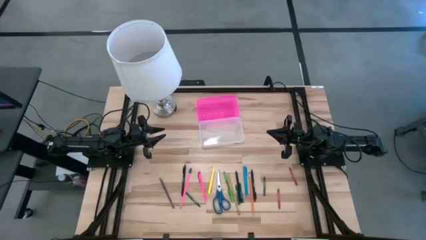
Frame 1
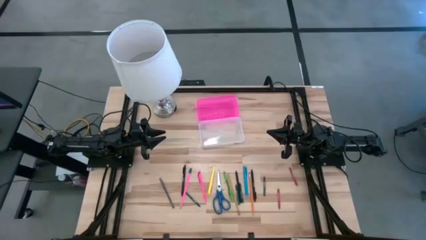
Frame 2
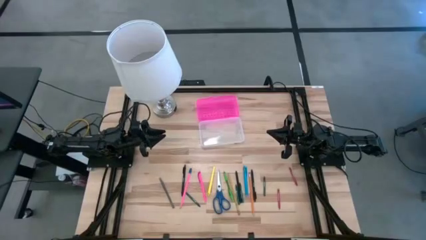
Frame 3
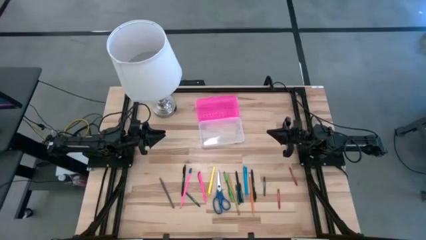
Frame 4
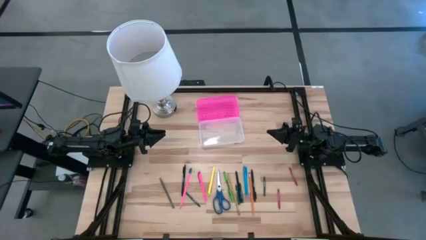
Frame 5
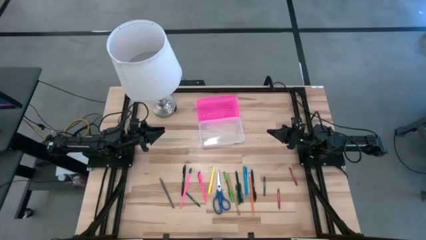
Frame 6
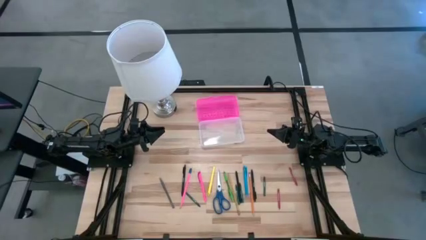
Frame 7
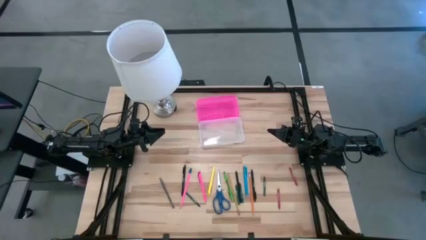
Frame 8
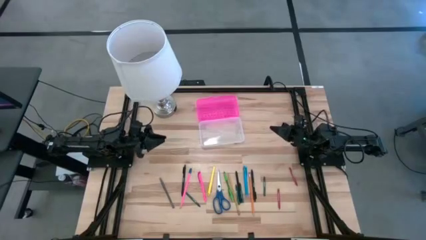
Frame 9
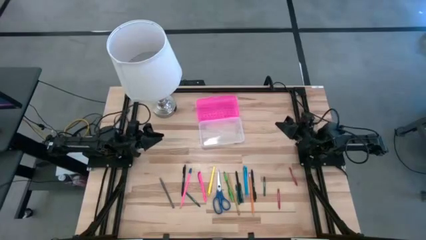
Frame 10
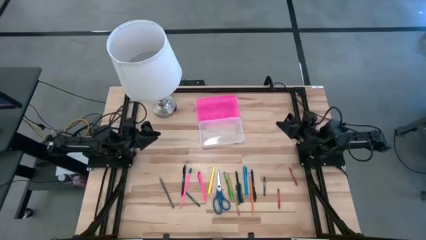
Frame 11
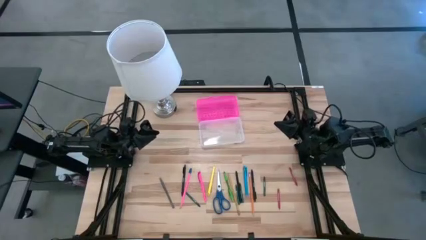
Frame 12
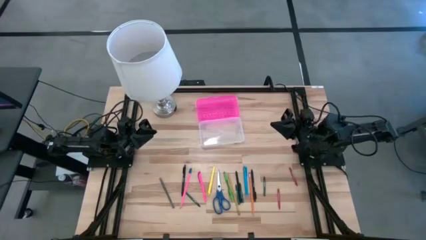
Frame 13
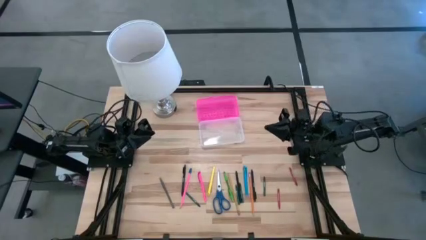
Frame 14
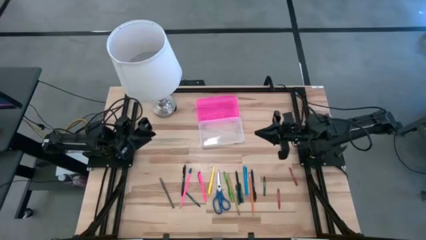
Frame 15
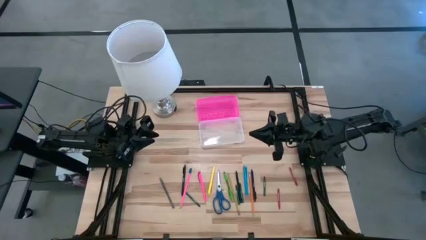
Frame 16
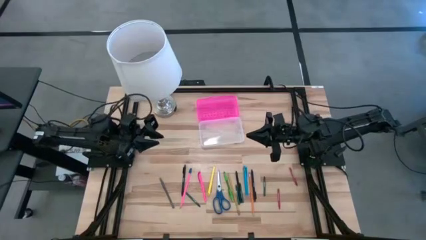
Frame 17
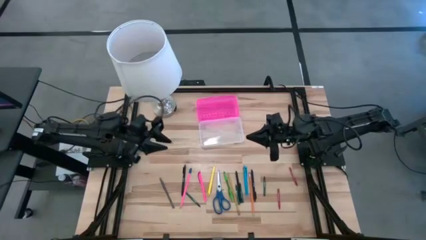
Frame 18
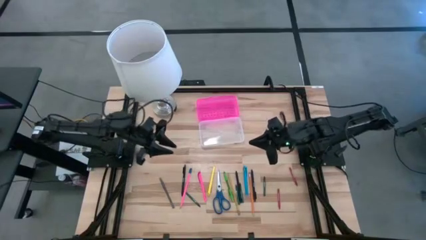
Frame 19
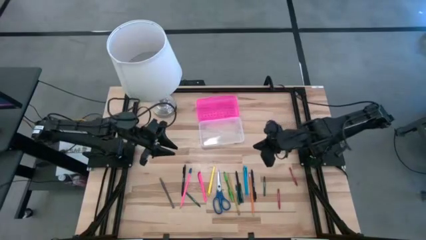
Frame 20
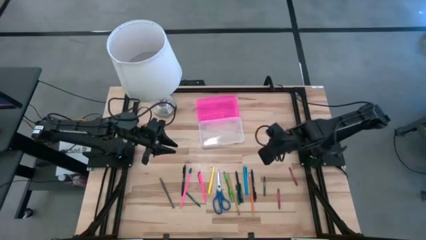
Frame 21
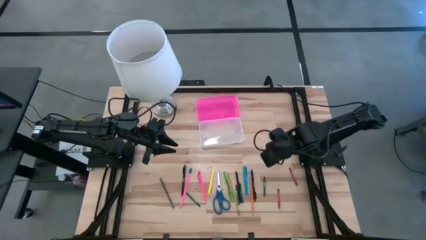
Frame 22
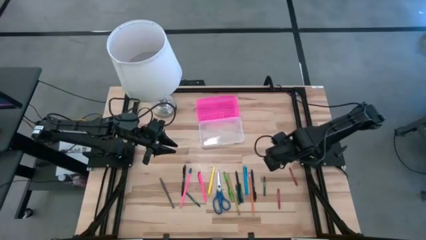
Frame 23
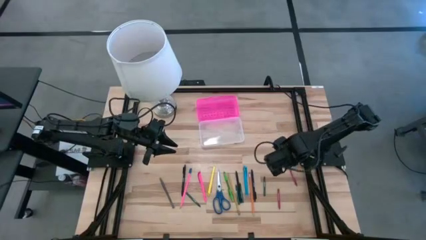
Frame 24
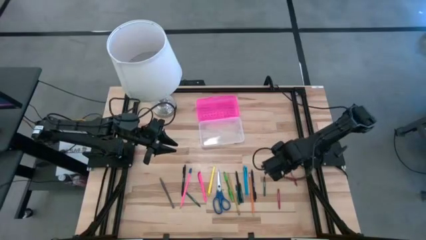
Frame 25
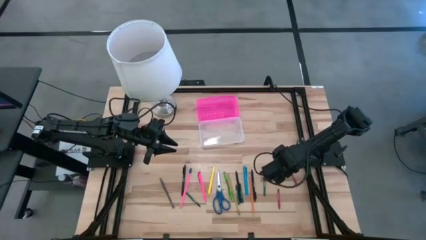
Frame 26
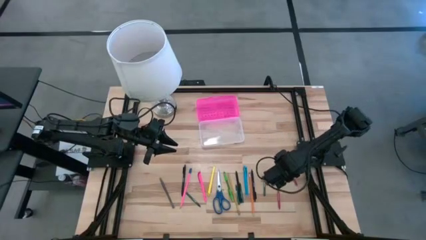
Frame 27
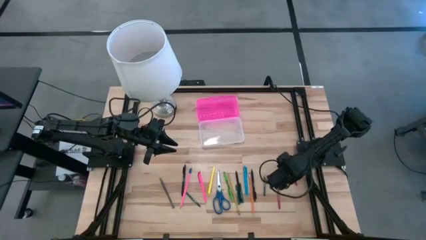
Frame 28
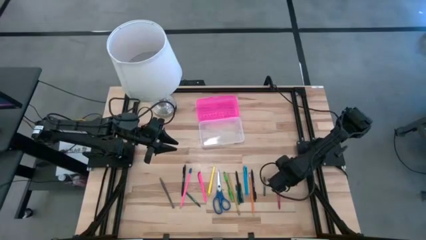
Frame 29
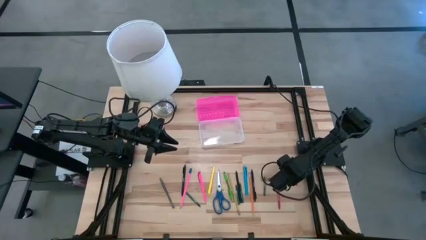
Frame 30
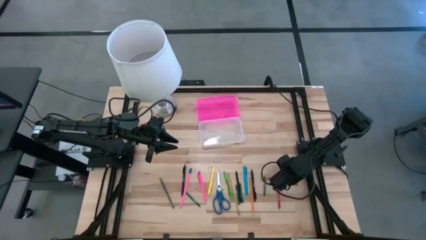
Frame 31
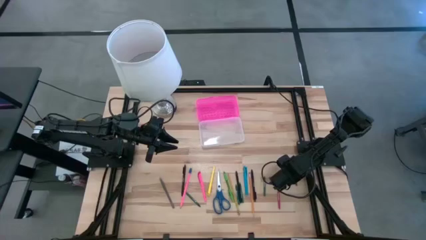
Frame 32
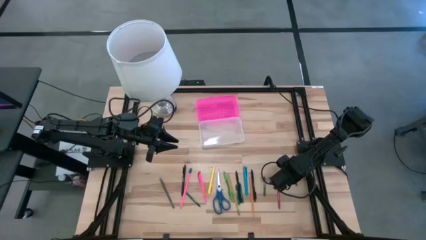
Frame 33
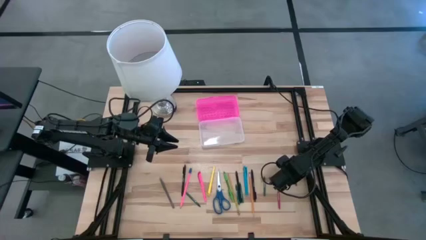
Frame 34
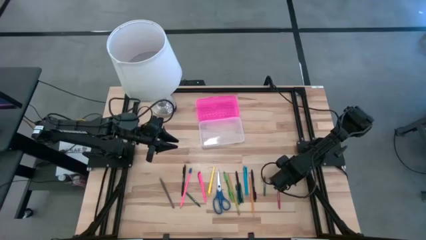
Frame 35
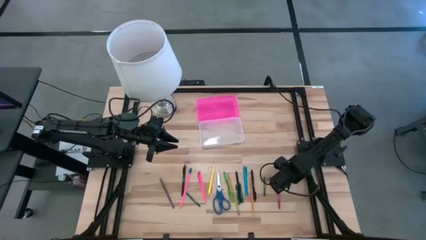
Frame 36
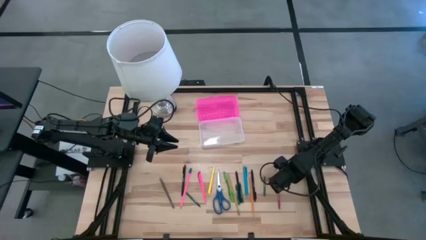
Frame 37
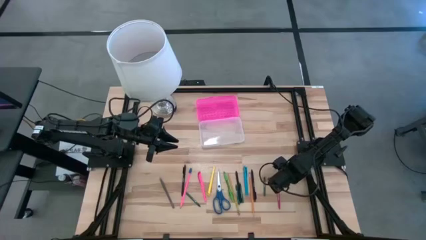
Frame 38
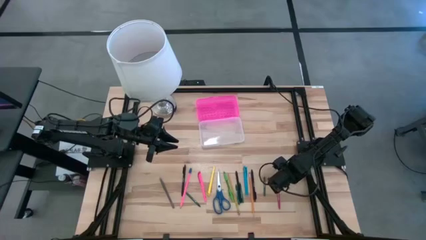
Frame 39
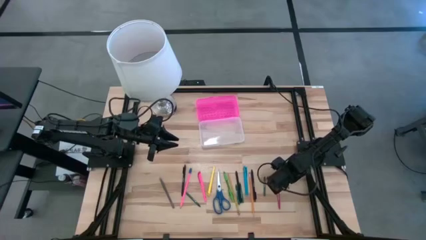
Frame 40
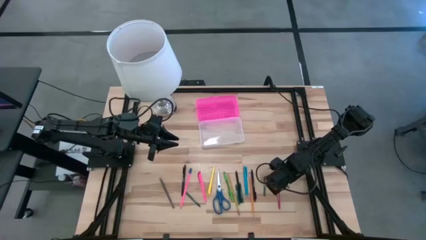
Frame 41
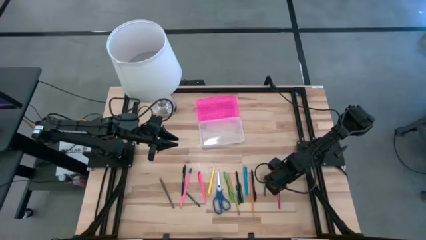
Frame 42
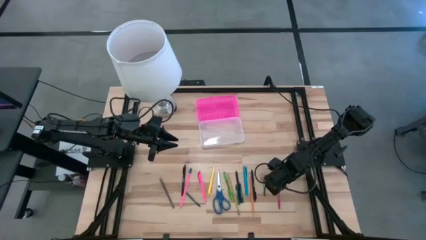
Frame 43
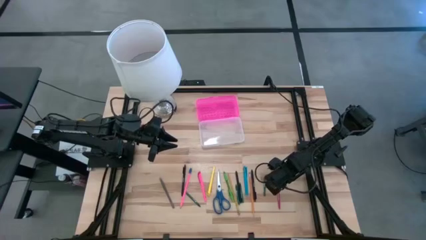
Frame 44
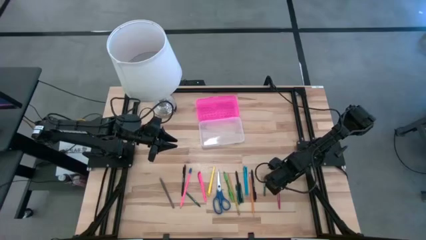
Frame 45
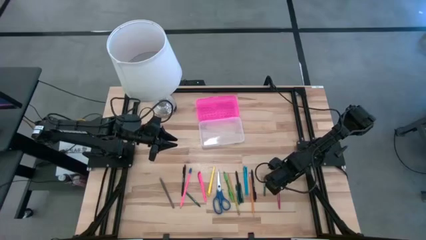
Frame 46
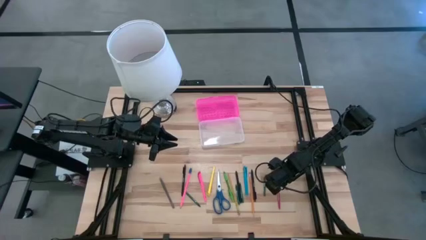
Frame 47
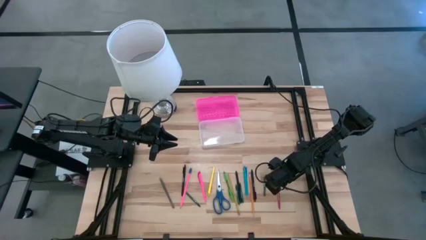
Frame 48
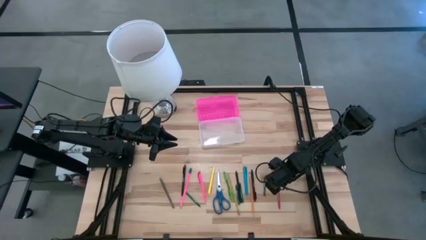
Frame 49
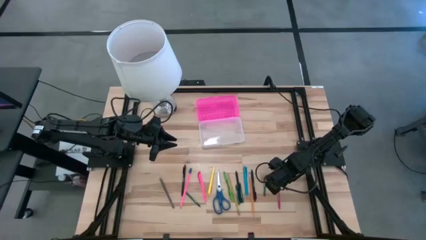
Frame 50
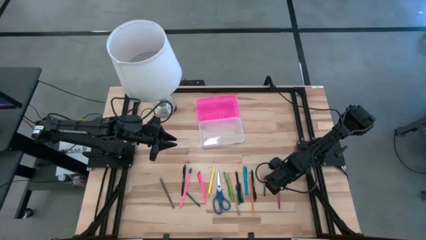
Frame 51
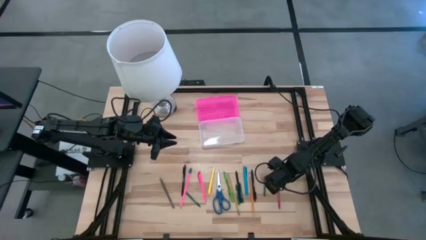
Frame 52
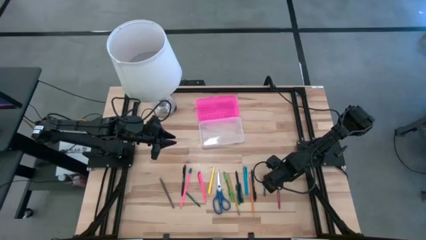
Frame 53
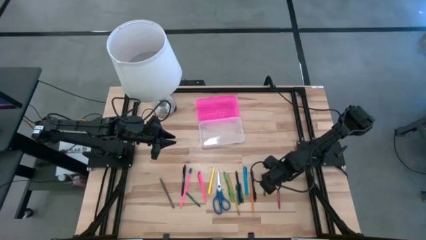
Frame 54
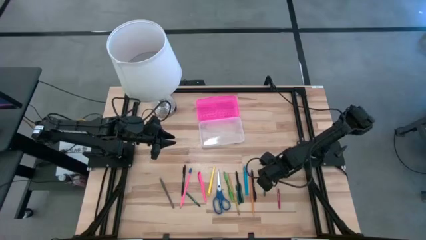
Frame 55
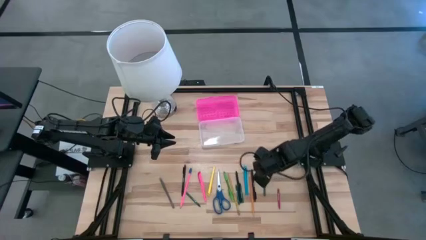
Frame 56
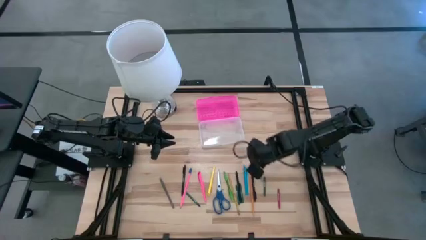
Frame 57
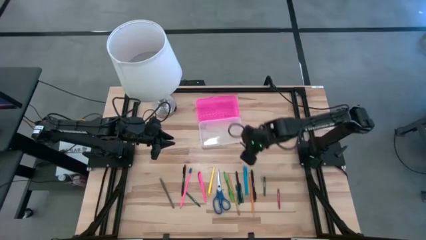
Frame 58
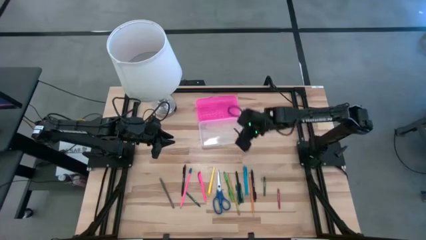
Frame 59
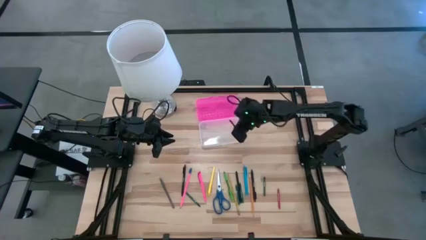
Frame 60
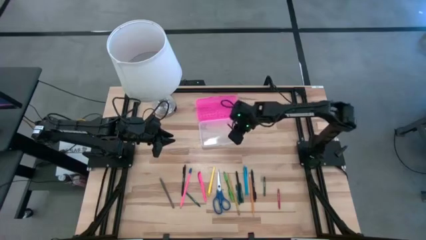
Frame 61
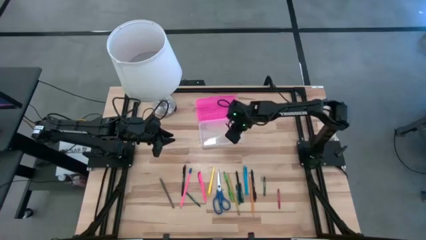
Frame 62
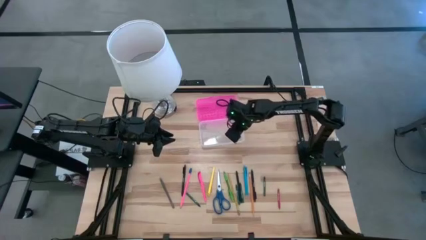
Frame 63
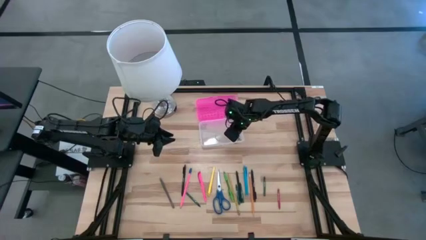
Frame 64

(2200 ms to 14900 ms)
Task: Pick & place school supplies into a supply box
Put the top red crayon into the pink supply box
